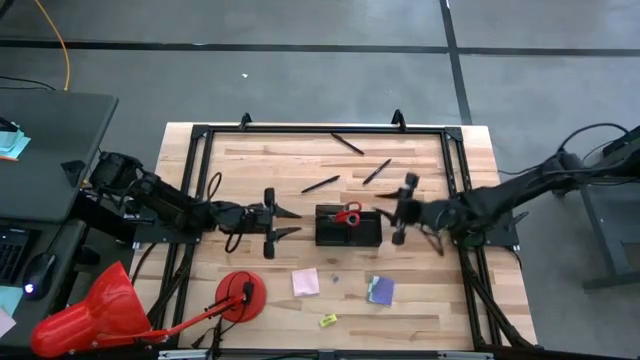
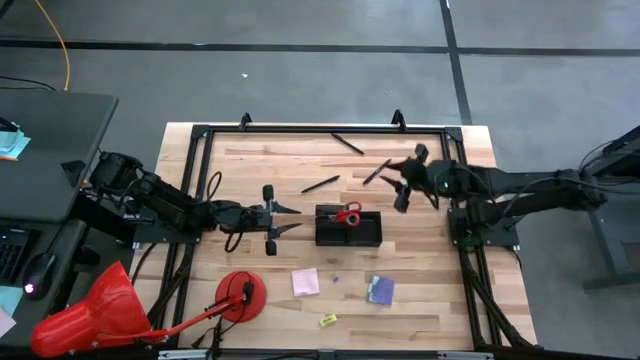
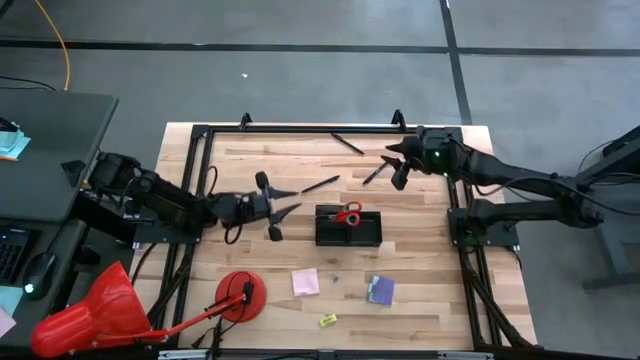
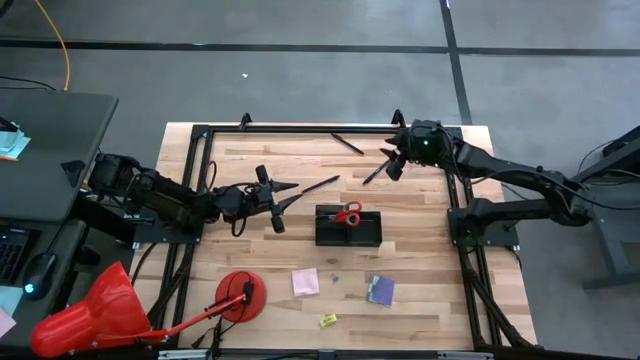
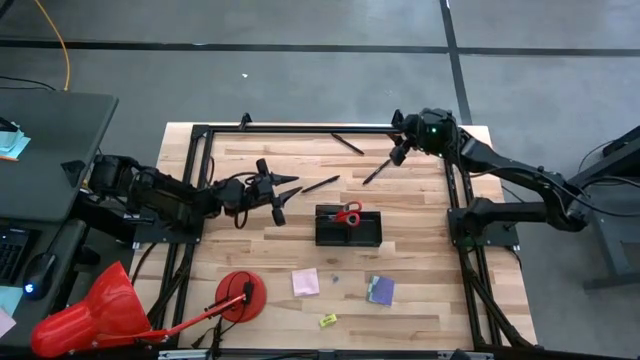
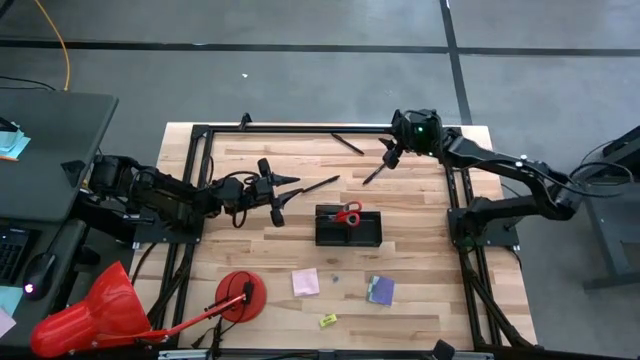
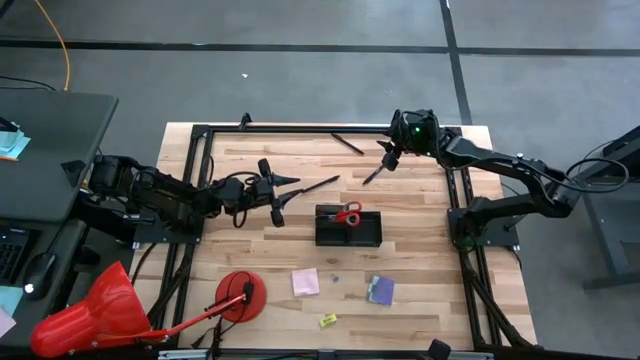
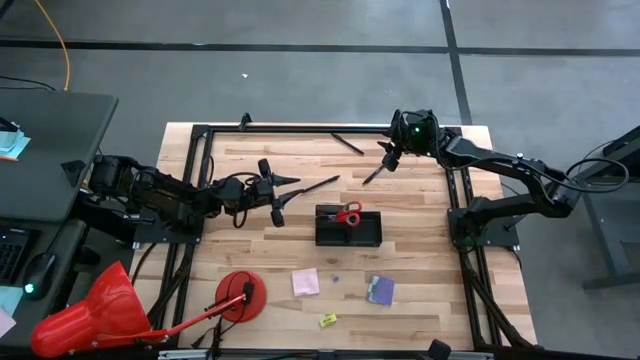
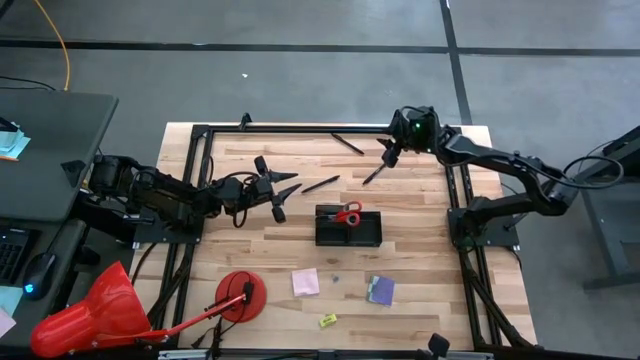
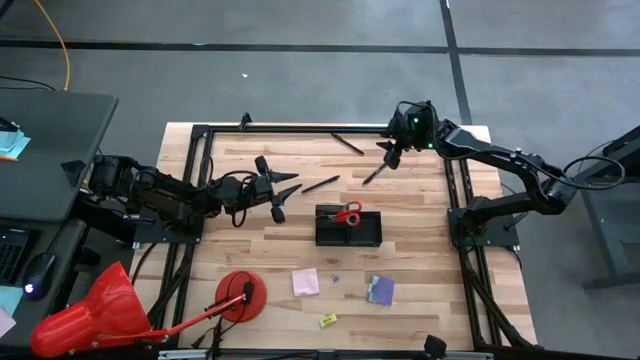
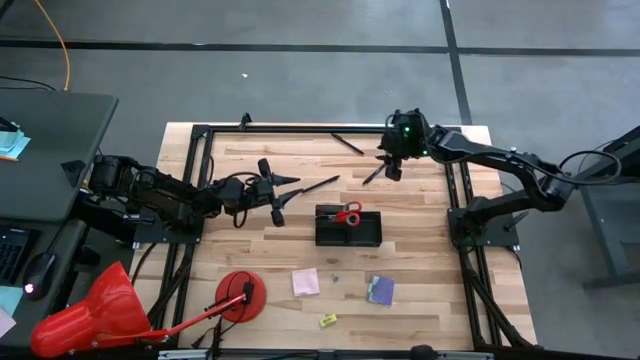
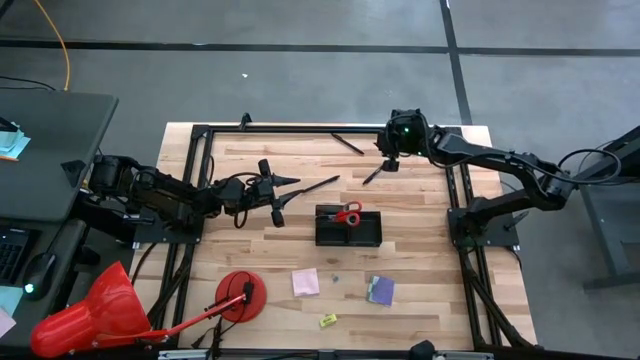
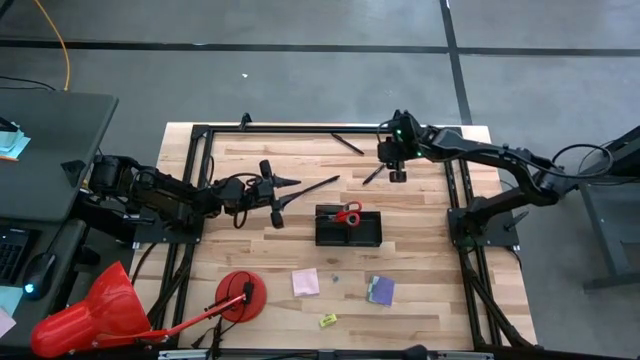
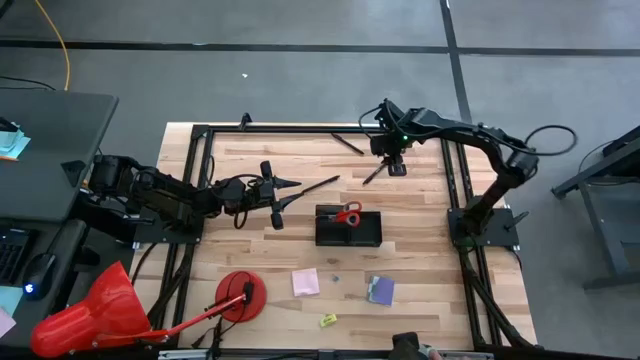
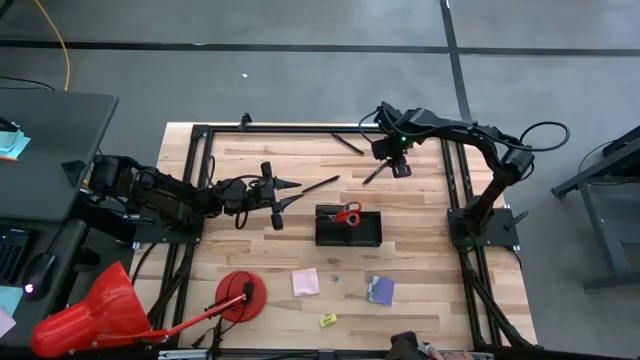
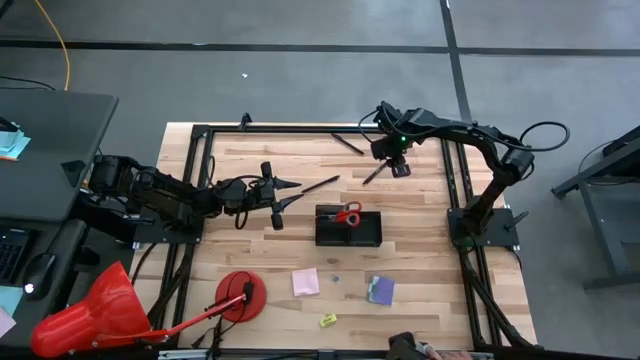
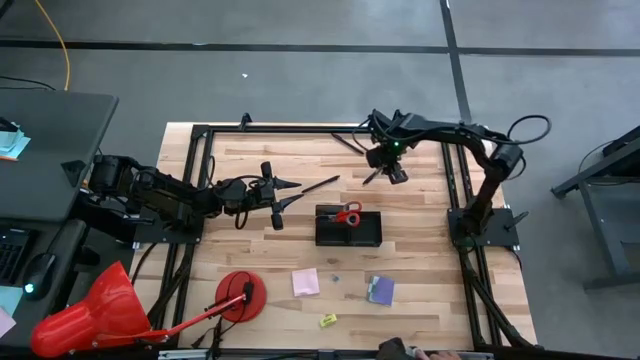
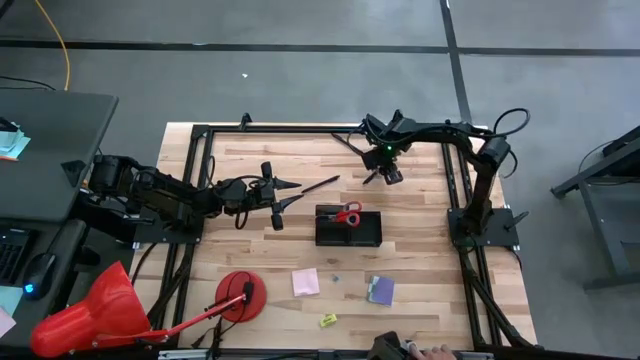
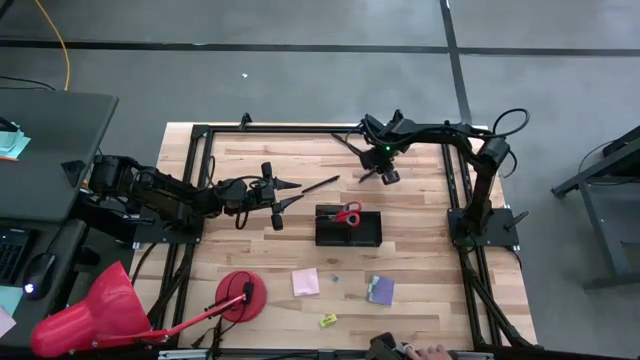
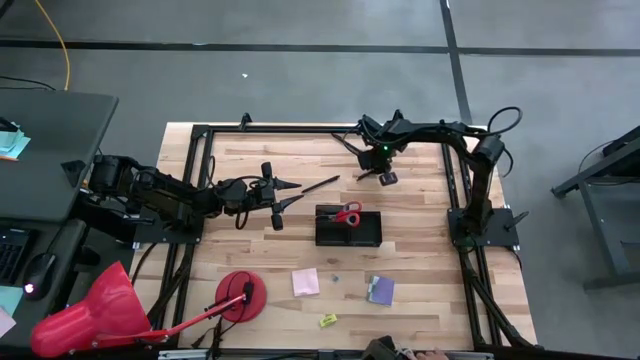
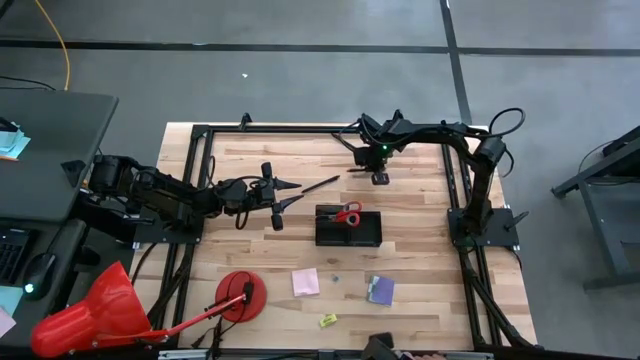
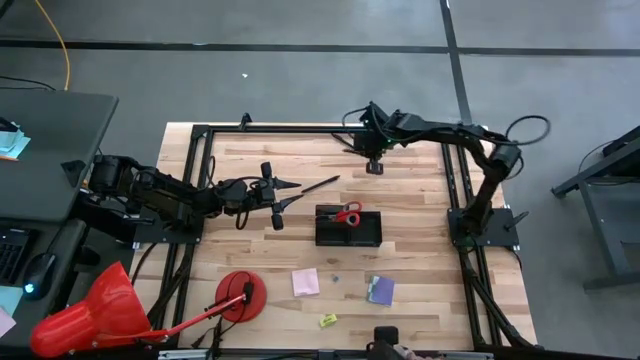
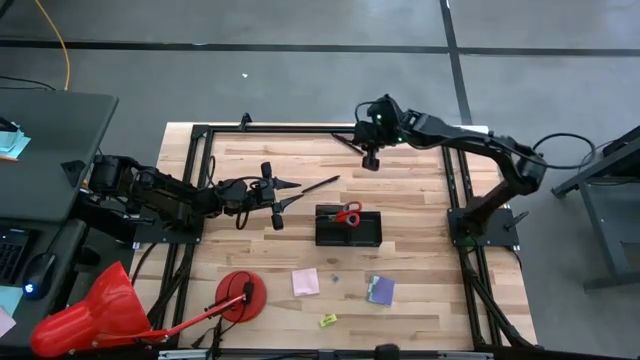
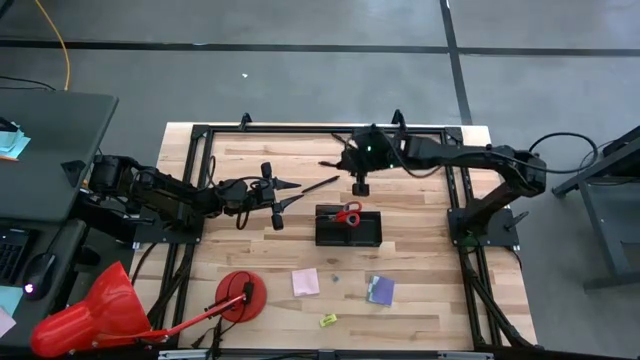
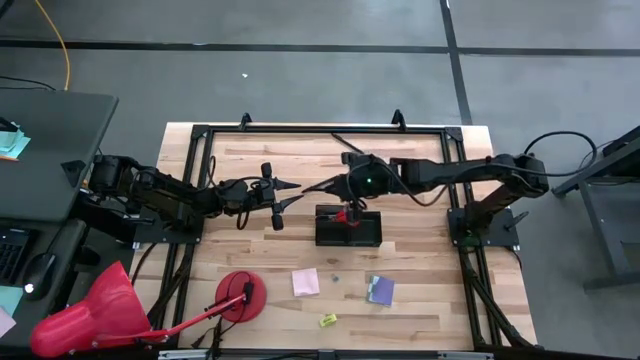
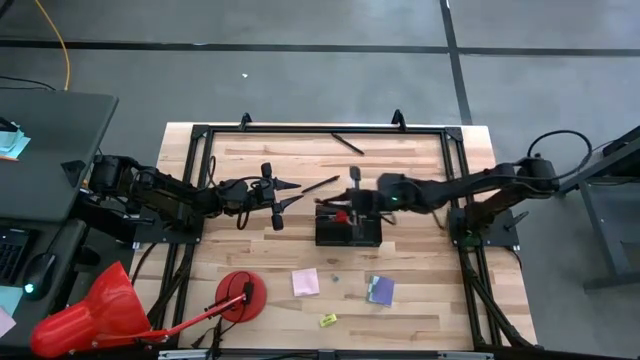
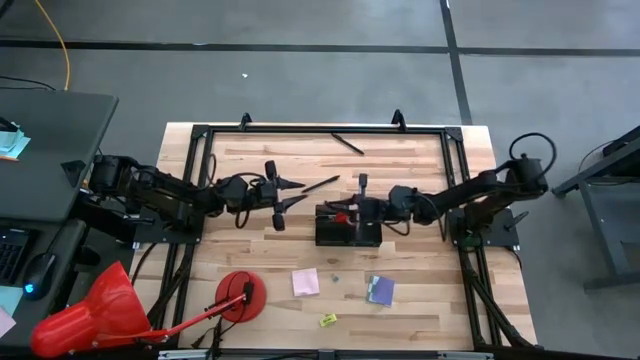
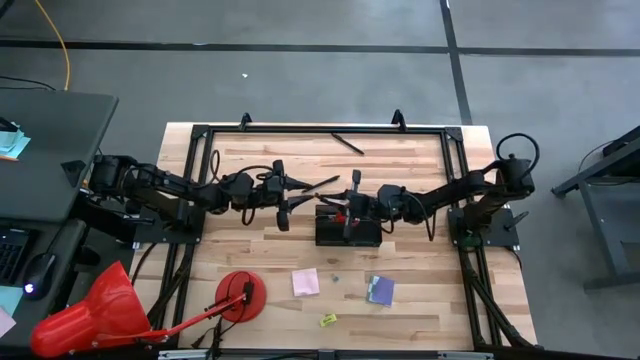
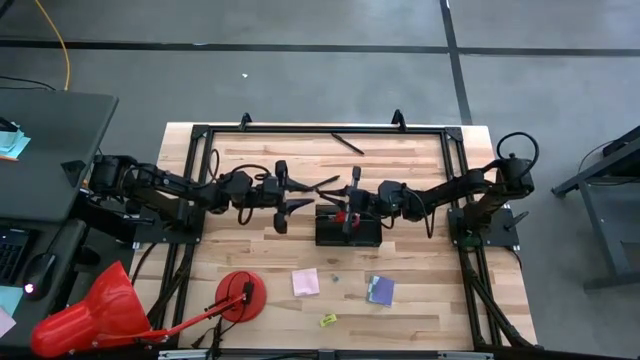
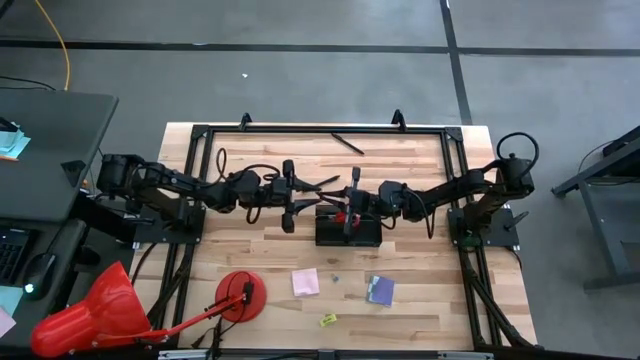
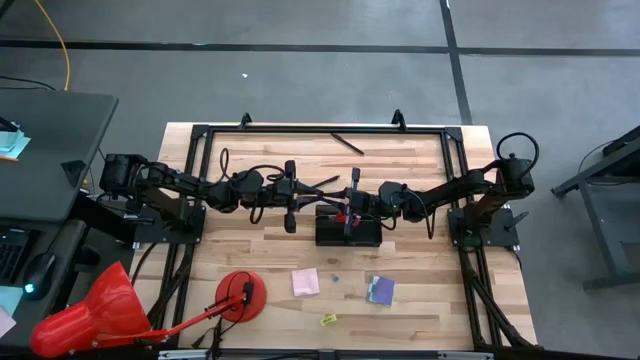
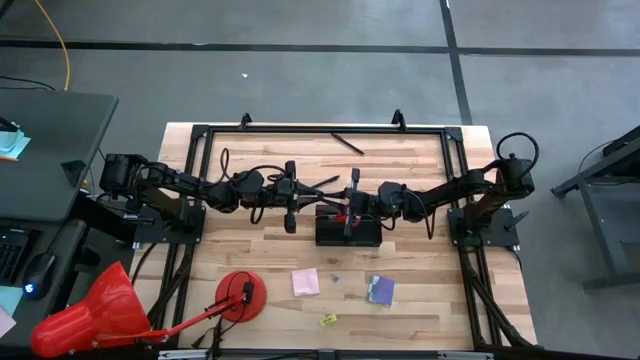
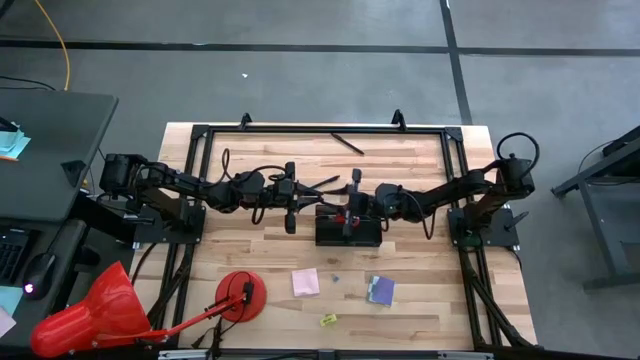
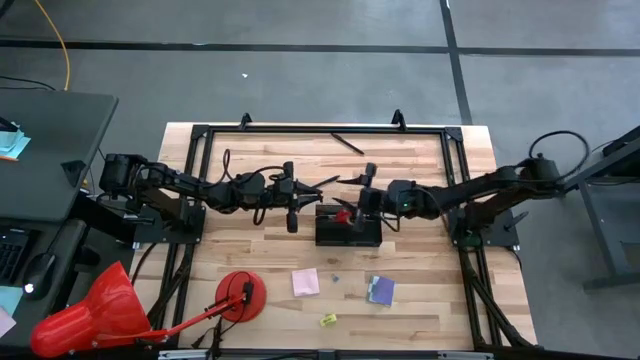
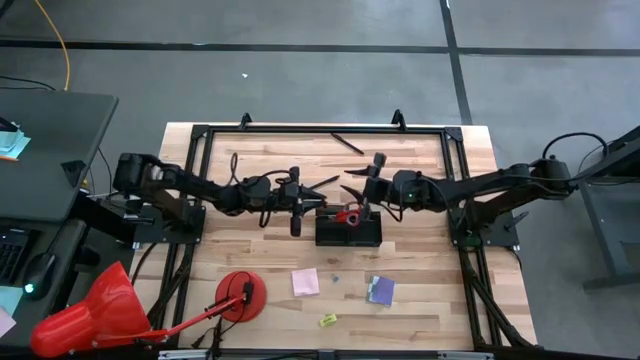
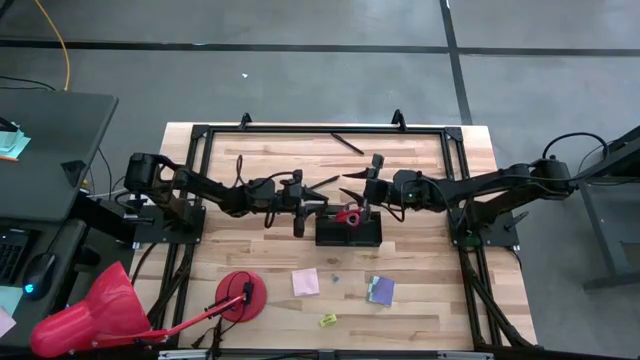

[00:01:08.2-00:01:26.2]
Task: Pick and place office supplies into organizer
Put the black pen into the black desk organizer

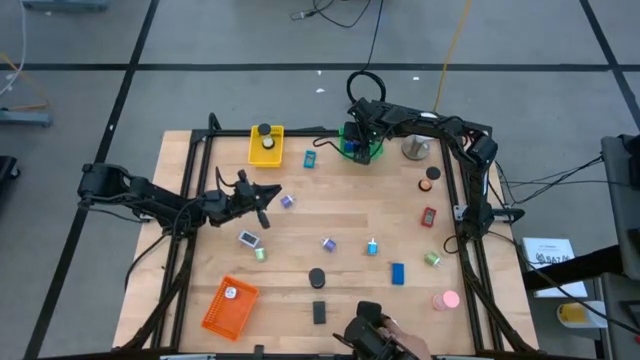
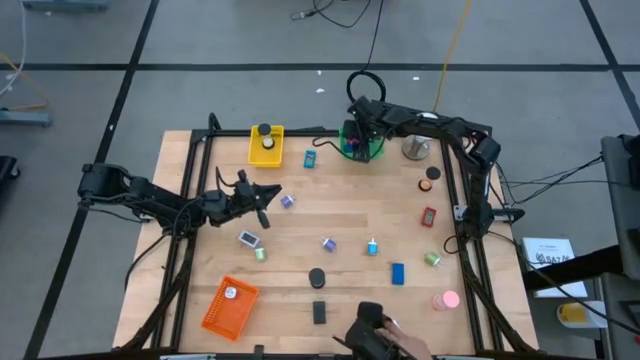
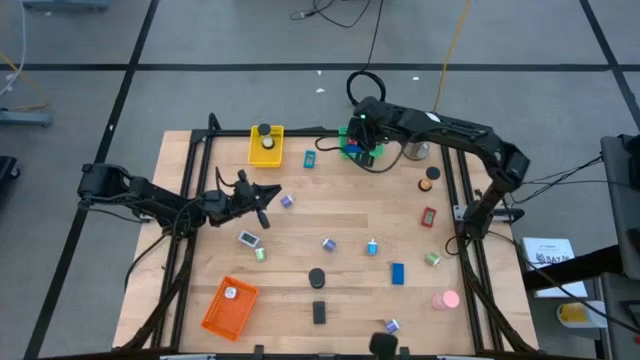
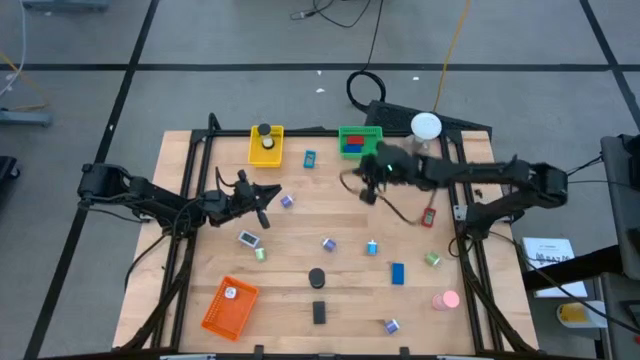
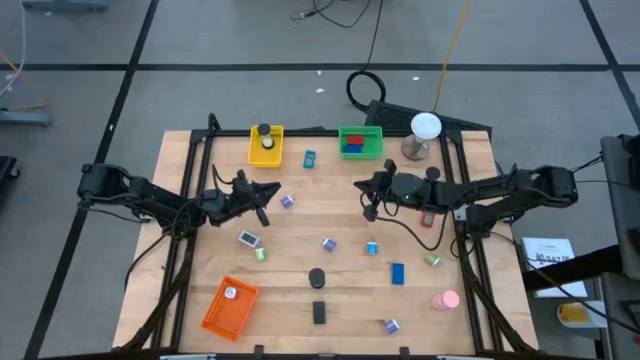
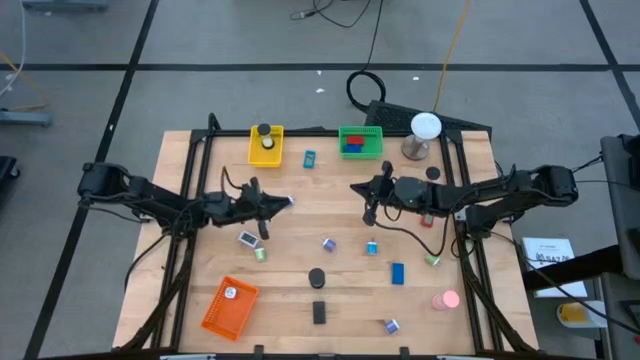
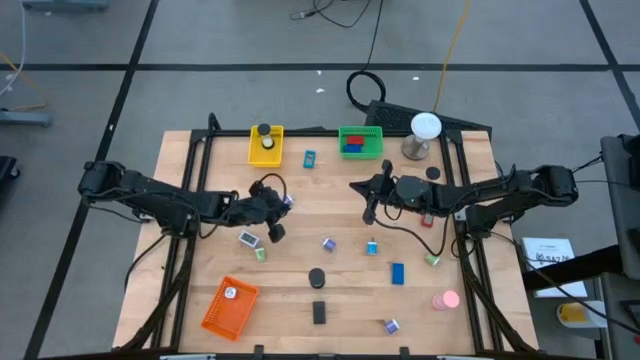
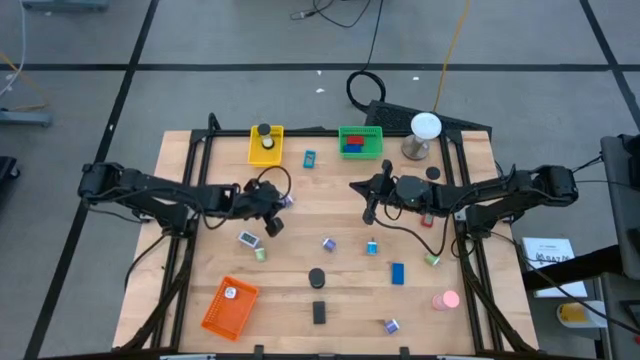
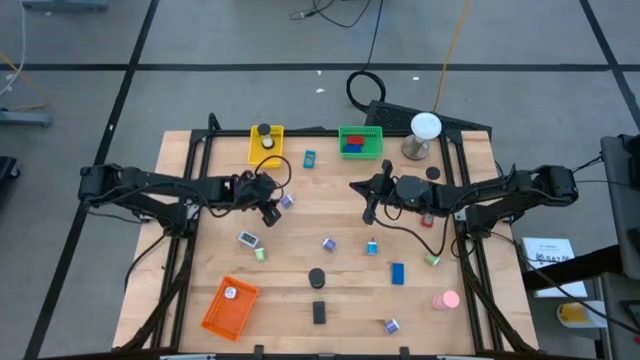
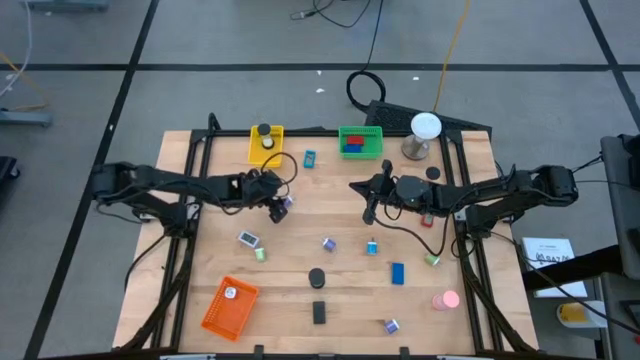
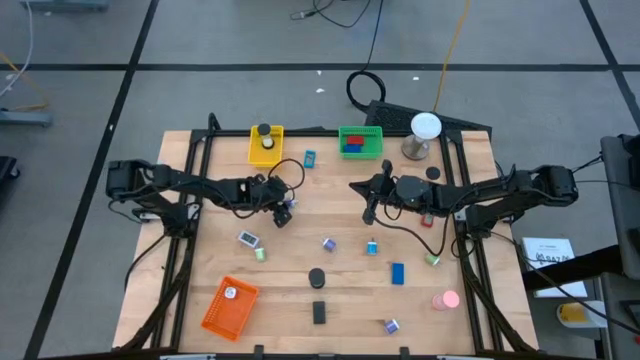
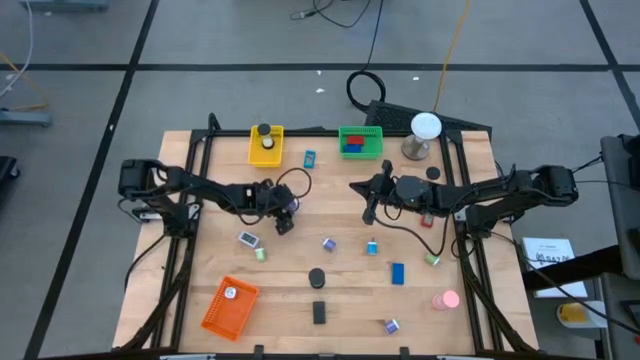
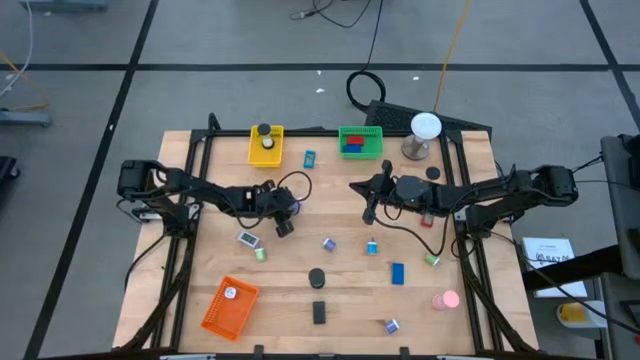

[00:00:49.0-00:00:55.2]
Task: Pick & Place Office items
Put the top purple charger adapter into the orange bin
